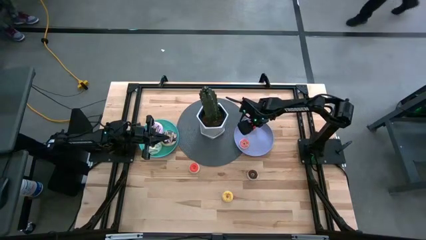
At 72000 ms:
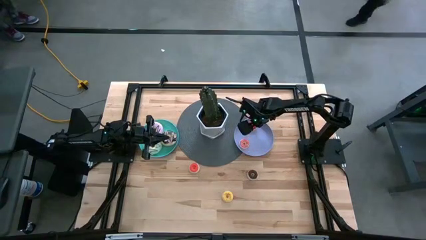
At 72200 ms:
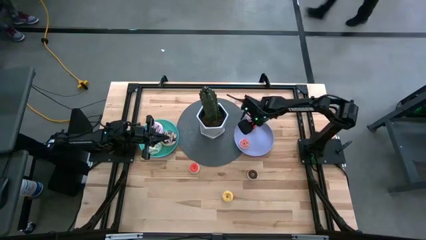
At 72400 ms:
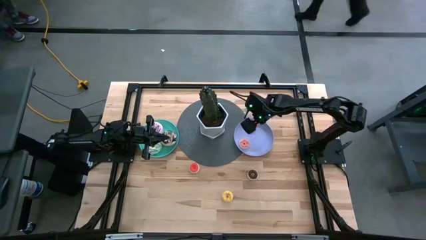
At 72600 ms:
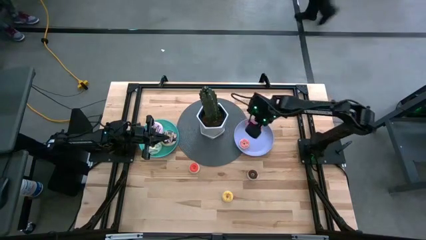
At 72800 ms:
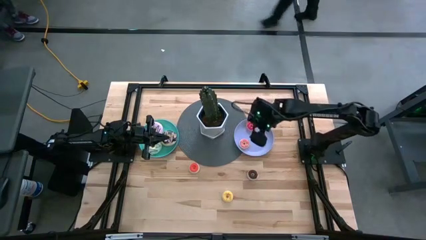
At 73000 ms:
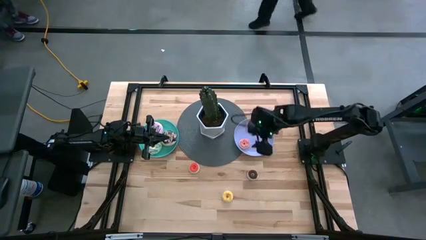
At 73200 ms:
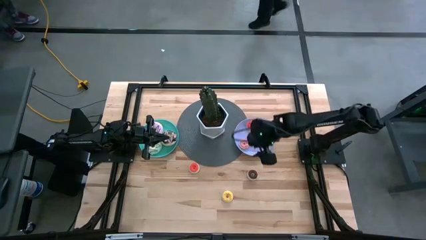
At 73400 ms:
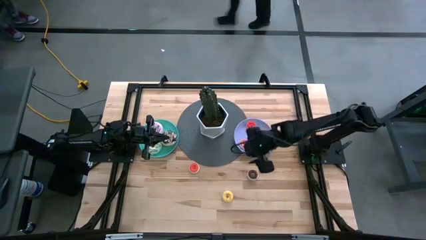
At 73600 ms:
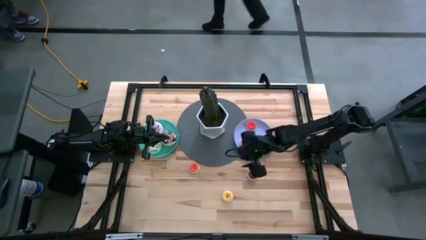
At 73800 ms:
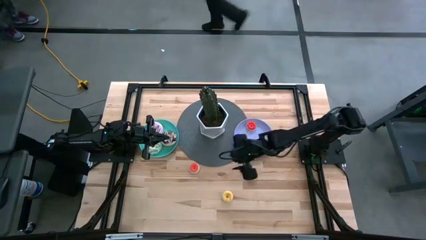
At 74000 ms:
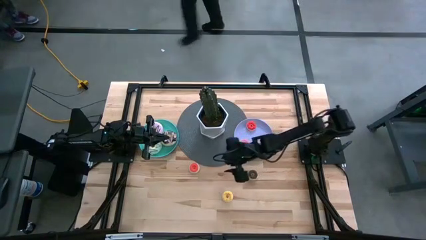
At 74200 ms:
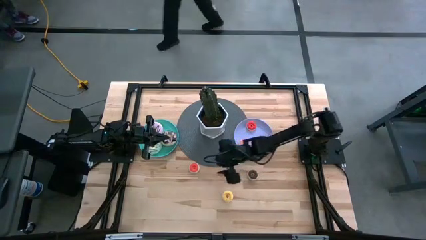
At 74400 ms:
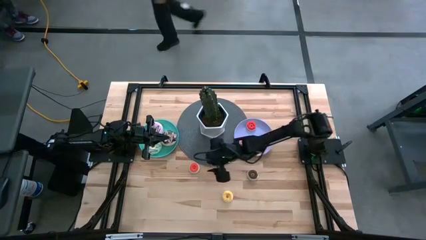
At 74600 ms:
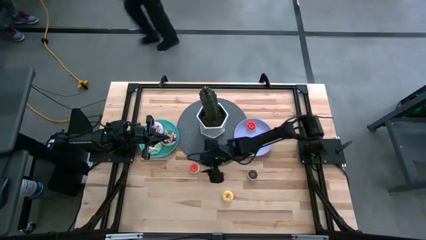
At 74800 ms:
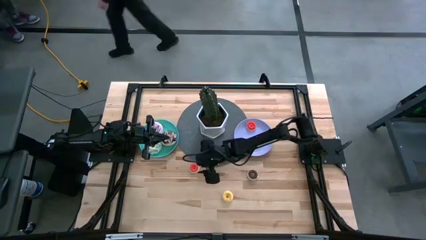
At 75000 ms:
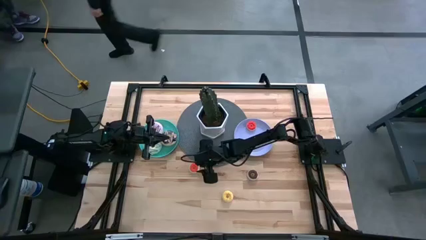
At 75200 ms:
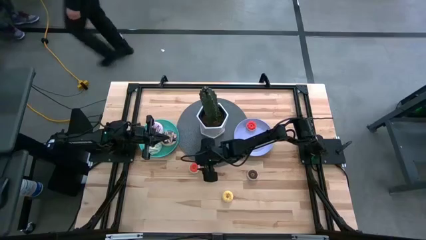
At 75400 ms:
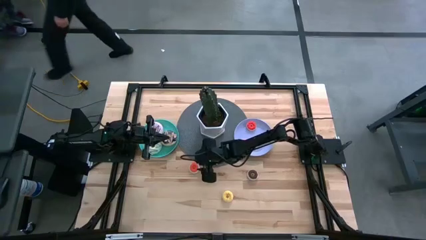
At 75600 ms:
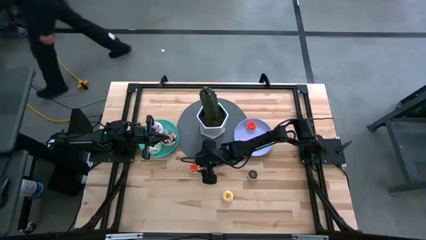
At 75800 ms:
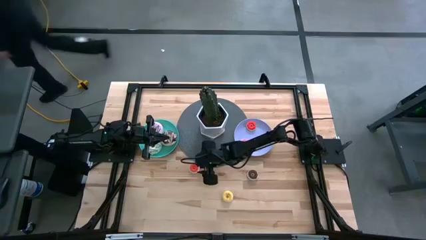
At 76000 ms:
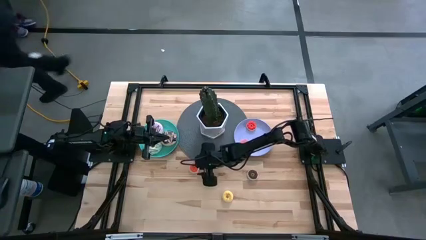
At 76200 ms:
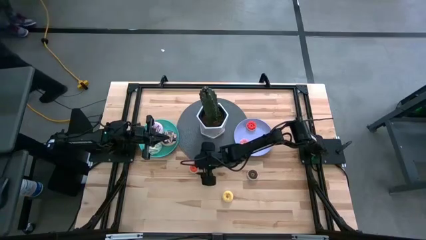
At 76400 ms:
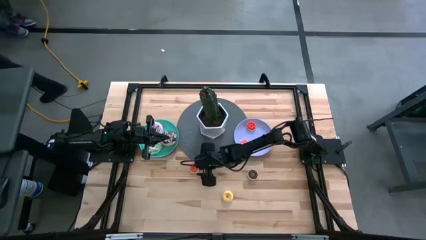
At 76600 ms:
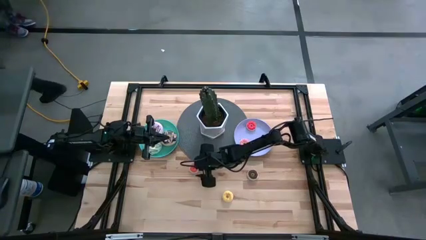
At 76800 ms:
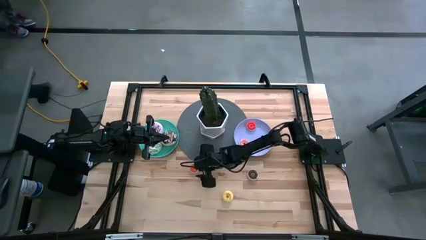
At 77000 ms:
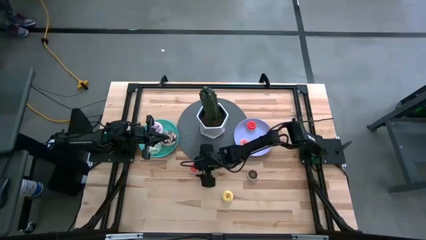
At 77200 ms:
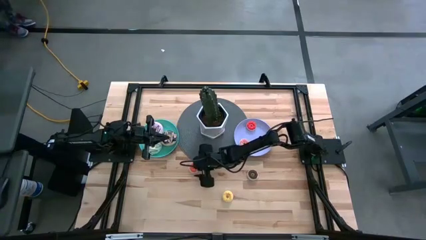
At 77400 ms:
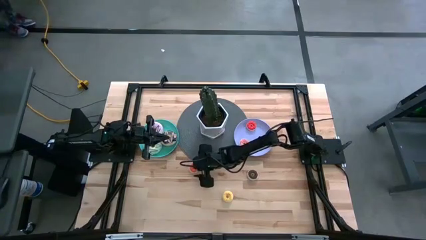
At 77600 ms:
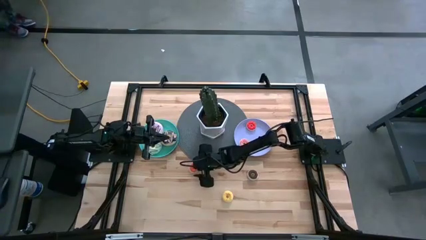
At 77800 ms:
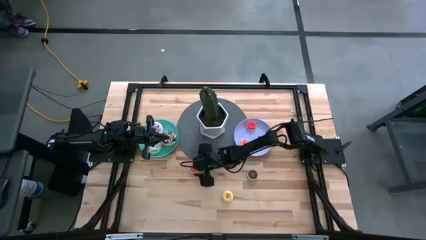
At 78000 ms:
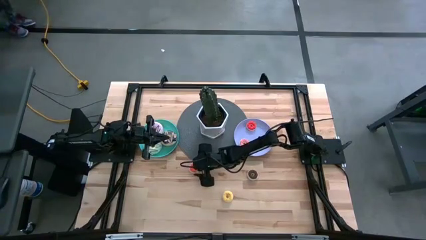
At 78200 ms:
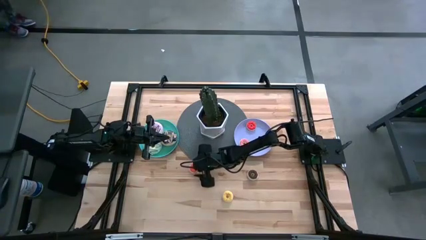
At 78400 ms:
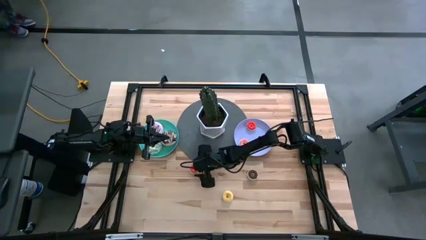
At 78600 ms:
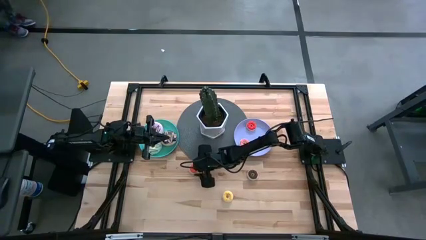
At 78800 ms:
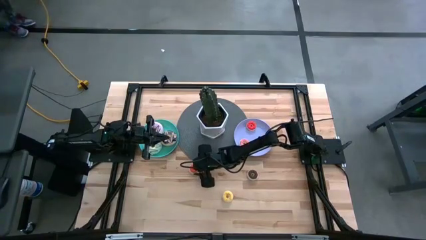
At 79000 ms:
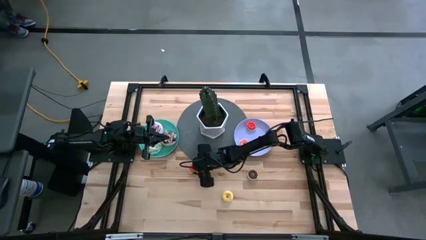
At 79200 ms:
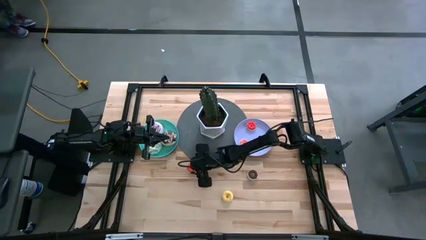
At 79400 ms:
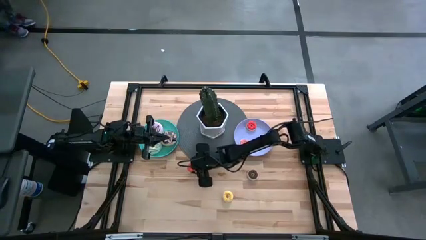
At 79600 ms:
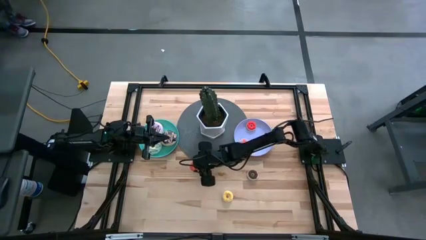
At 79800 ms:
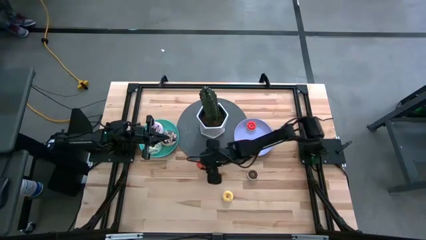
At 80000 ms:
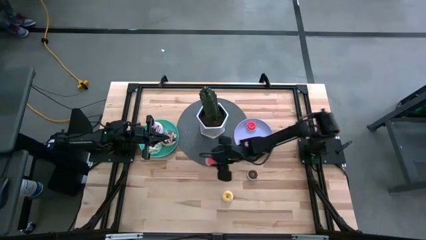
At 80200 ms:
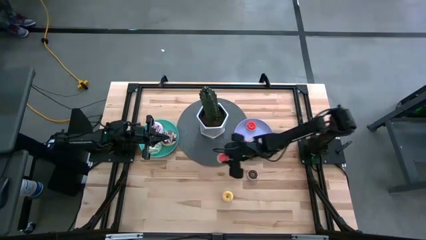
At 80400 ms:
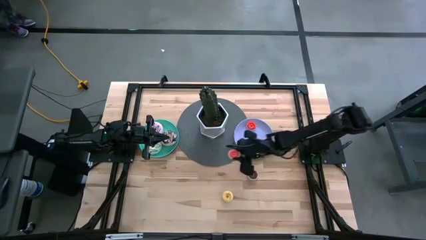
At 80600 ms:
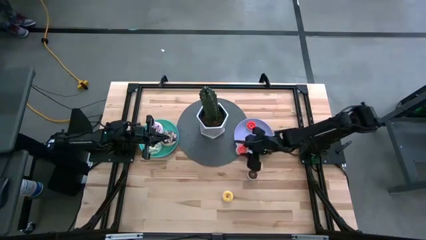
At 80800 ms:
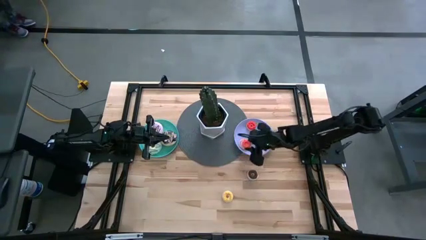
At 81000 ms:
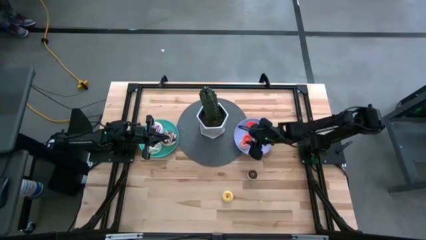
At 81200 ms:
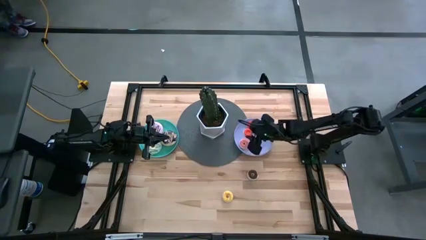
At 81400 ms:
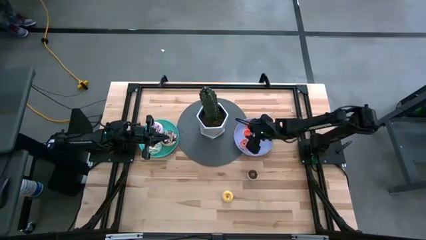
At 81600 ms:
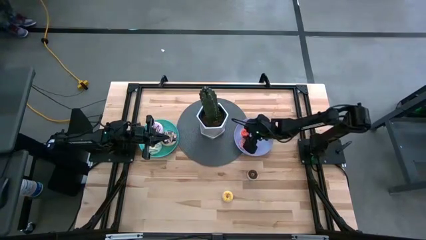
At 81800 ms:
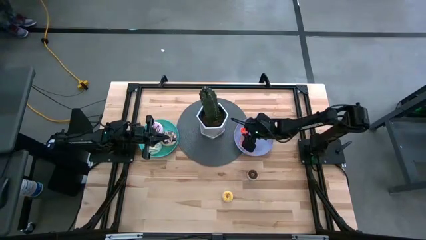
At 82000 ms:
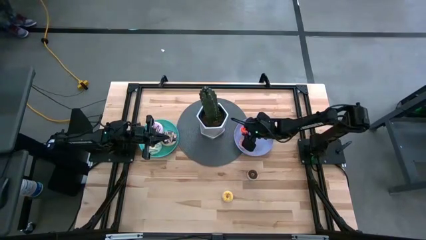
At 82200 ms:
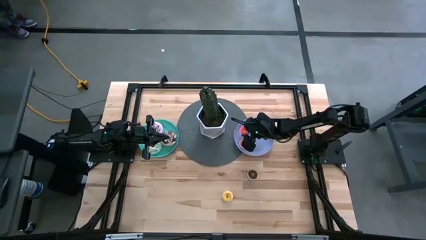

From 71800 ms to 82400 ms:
Task: Pick & Place donuts
Put the small orange donut on the purple plate
